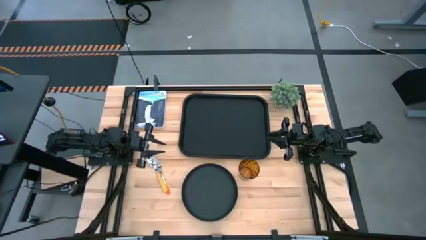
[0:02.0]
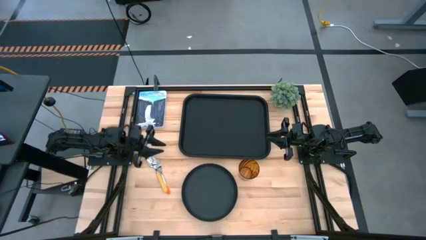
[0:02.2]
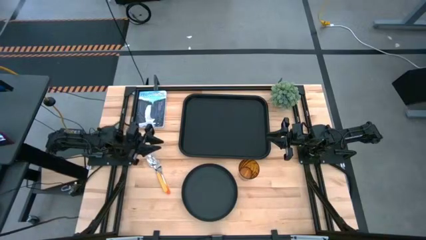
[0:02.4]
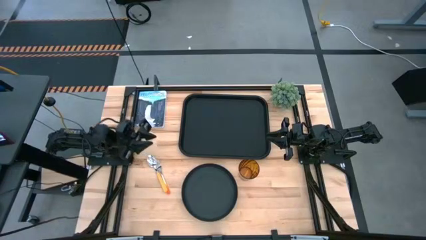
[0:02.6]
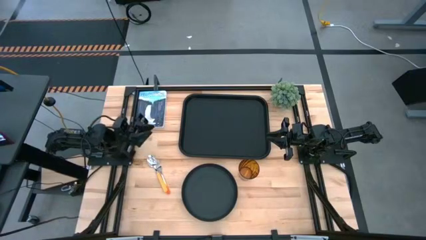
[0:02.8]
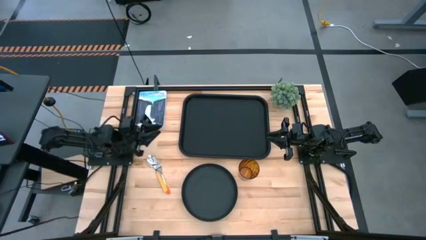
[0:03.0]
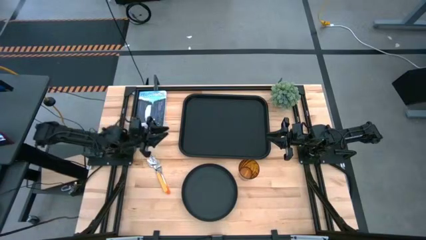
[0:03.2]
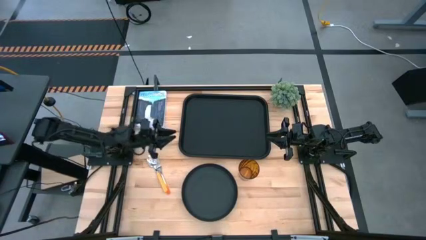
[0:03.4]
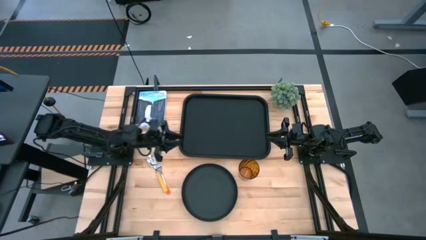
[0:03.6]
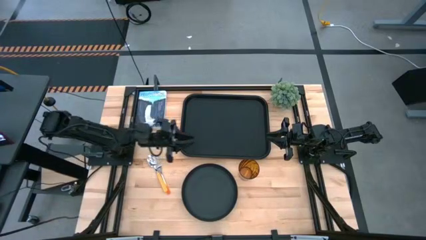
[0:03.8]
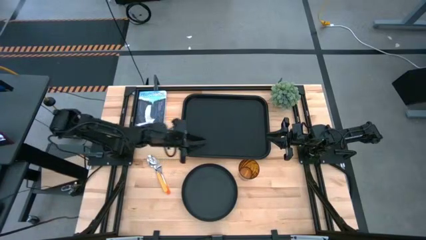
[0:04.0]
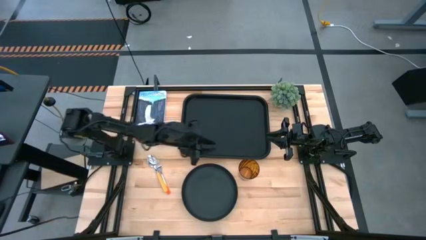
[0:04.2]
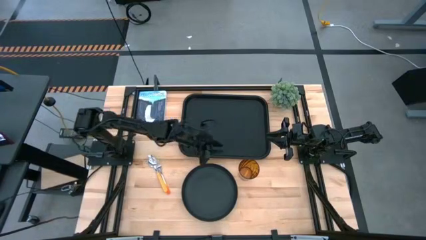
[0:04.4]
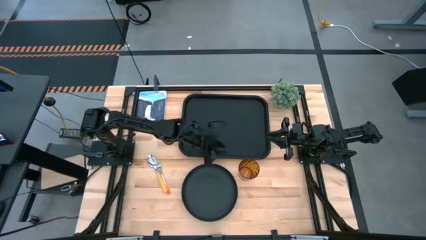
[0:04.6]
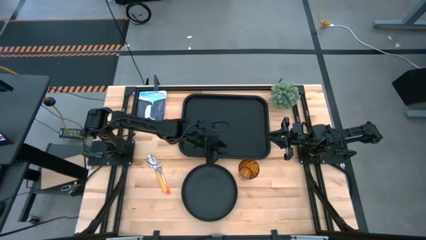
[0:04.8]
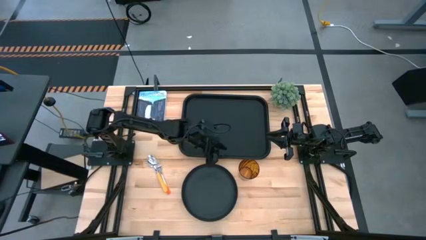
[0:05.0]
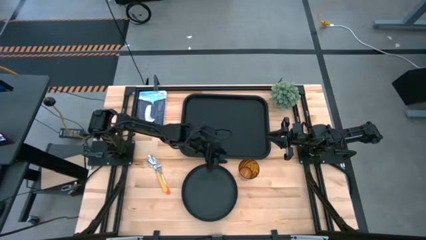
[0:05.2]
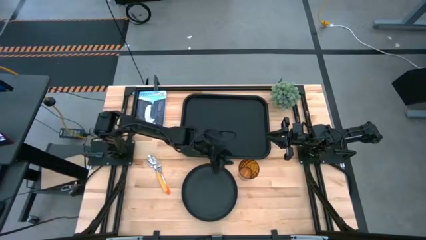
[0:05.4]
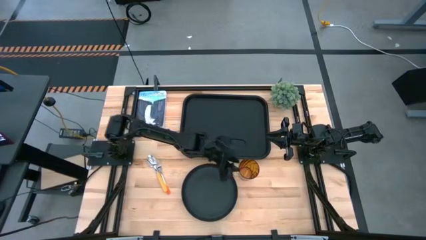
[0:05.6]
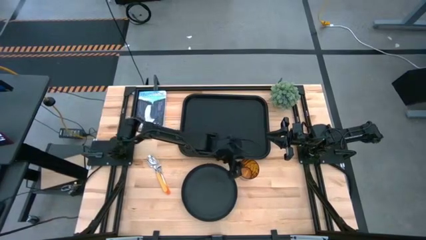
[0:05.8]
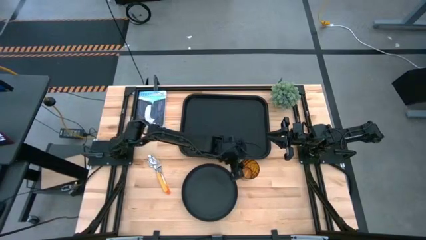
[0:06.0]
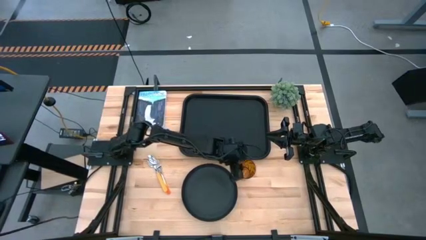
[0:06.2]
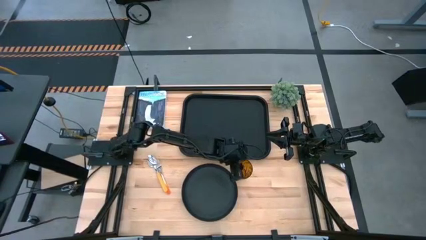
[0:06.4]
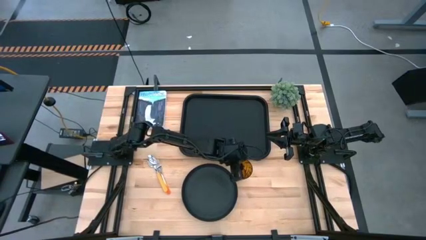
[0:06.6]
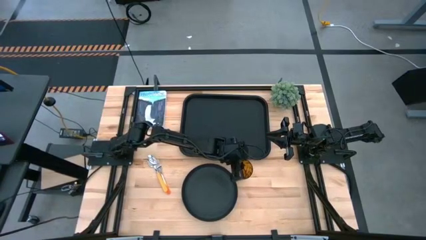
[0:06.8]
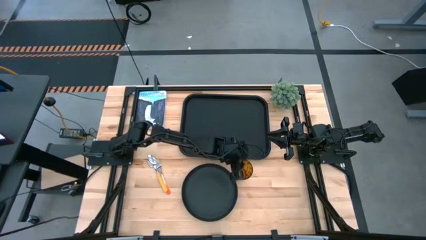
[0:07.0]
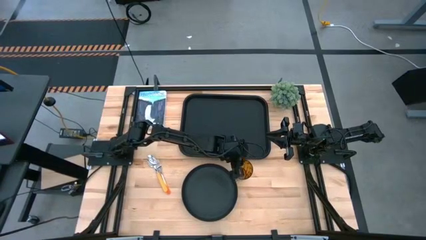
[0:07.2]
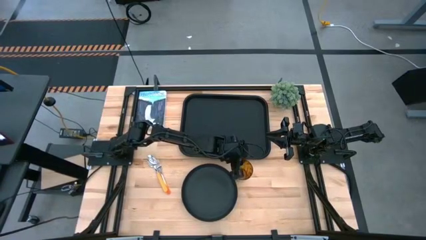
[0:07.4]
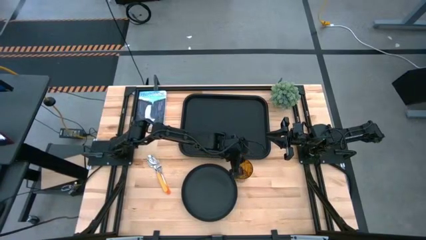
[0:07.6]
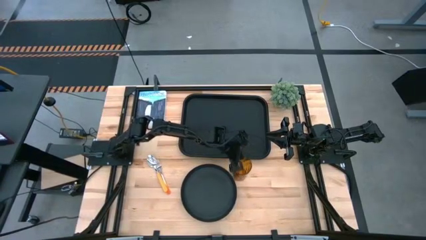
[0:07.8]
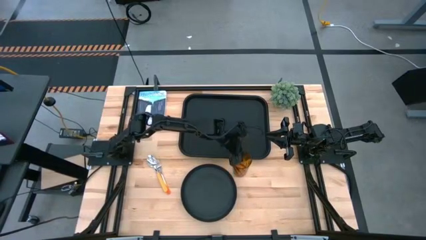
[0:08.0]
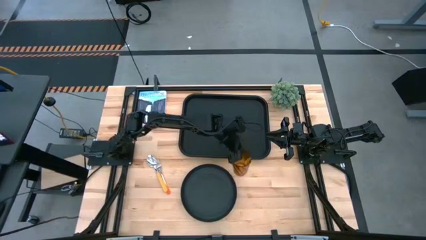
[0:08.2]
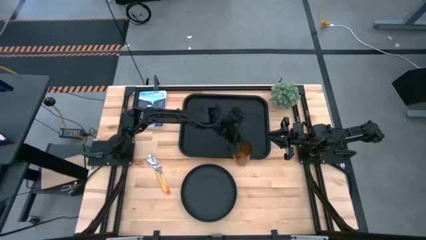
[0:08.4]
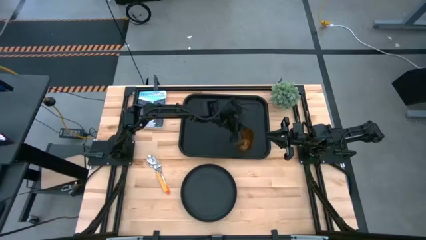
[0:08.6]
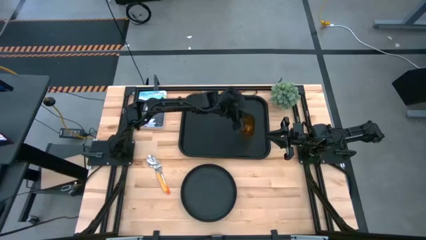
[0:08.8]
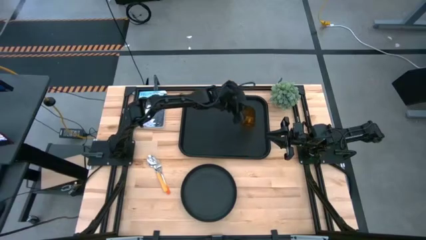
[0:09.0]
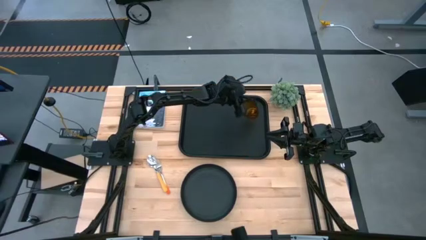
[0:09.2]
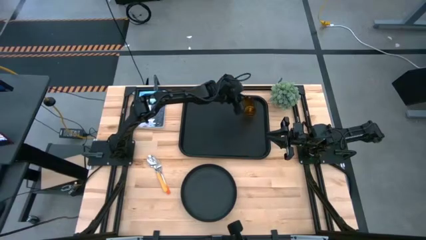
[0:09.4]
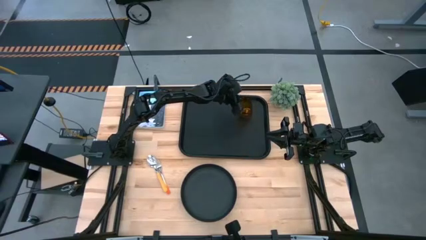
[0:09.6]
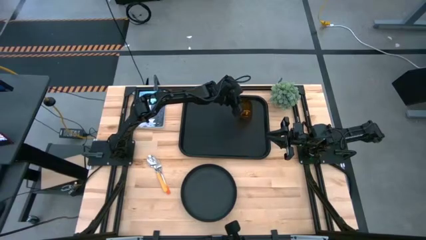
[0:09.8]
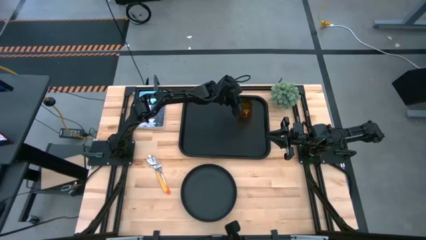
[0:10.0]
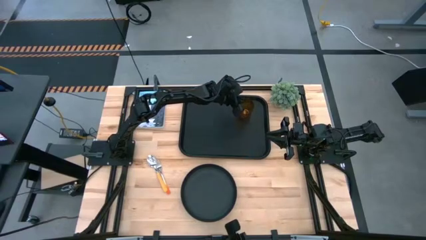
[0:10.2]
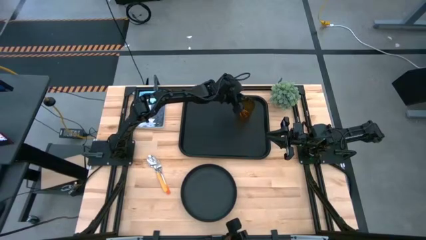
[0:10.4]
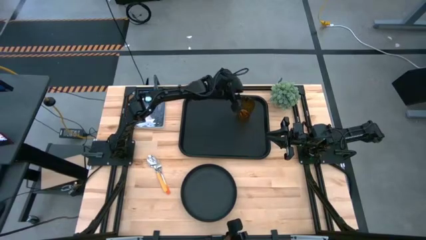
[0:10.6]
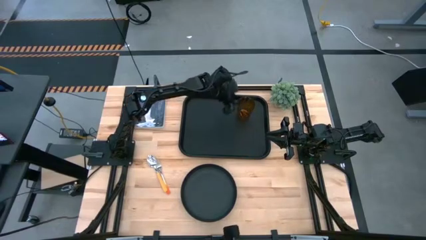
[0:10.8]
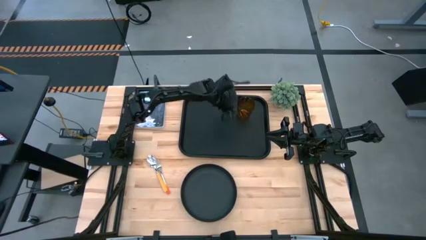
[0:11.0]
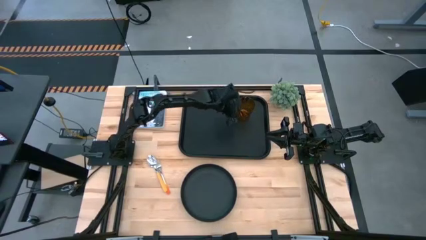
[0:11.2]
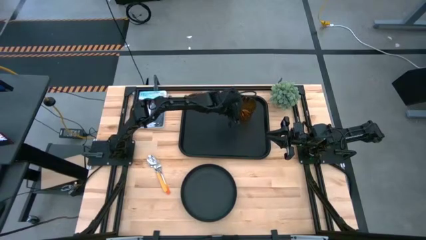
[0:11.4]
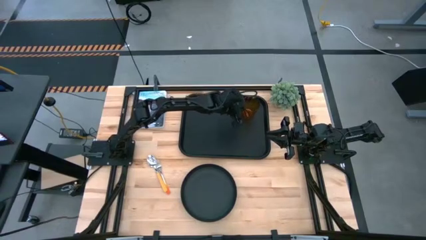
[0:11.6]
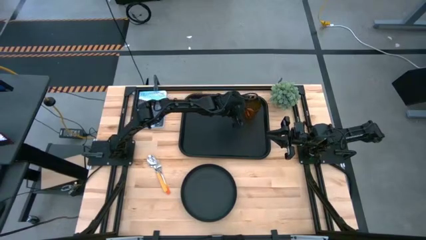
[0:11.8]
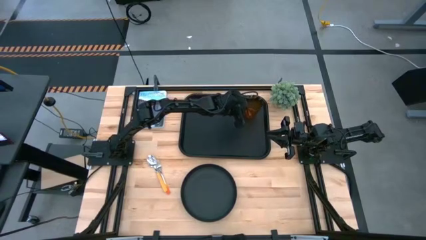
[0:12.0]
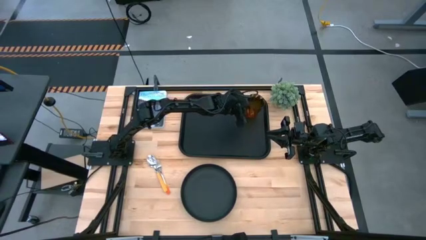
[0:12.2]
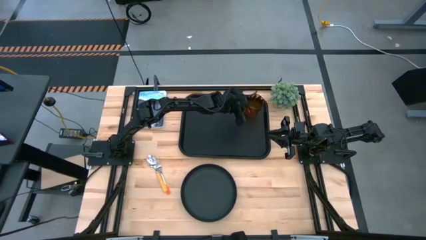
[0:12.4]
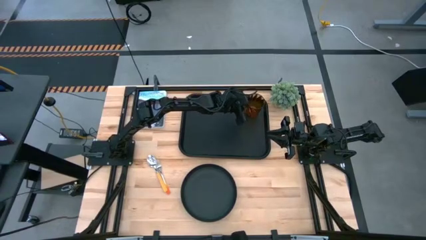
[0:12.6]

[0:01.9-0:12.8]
Task: Pick and place plate/cup/fork/spoon on tray
Put the brown glass on the top right of the black serving tray

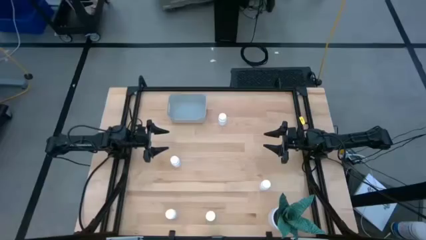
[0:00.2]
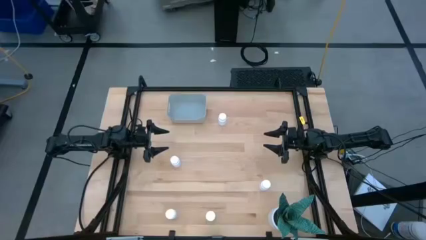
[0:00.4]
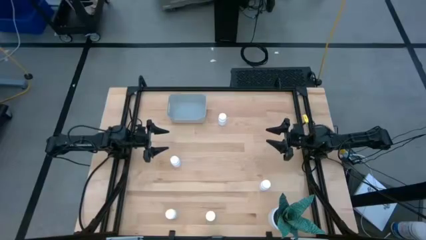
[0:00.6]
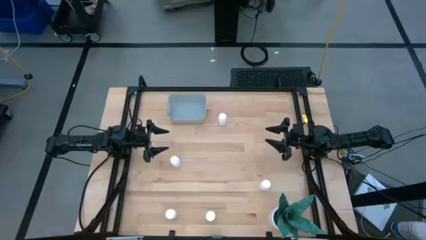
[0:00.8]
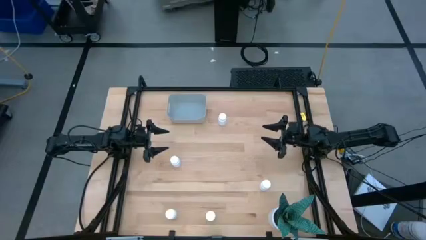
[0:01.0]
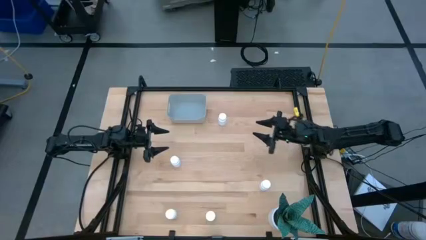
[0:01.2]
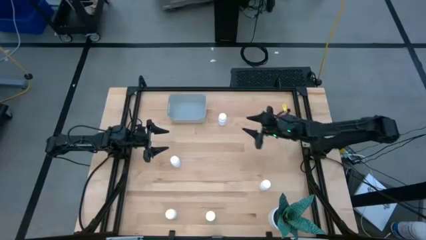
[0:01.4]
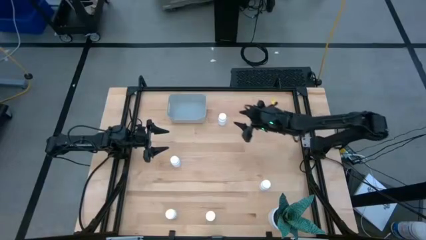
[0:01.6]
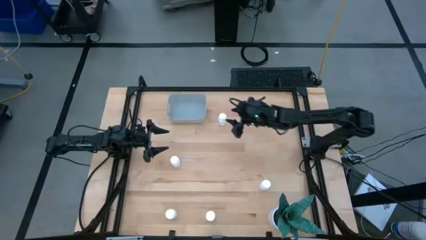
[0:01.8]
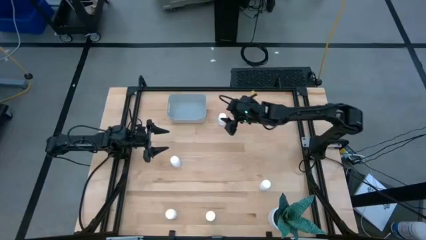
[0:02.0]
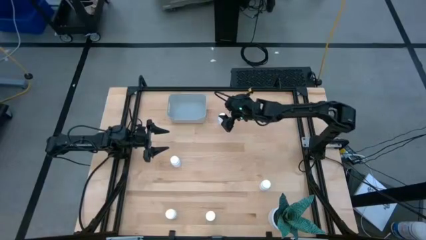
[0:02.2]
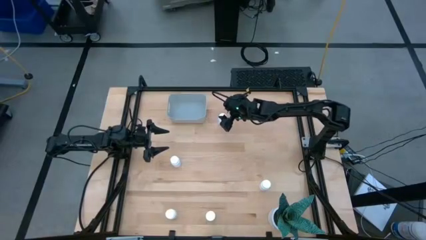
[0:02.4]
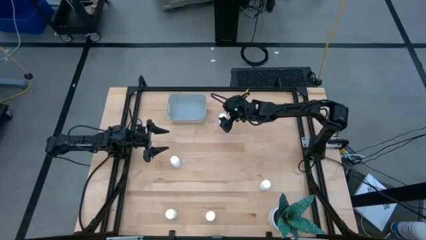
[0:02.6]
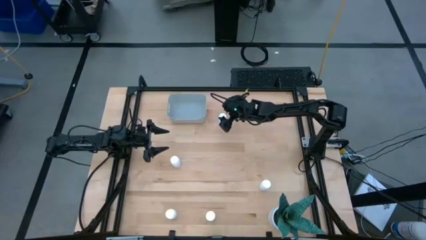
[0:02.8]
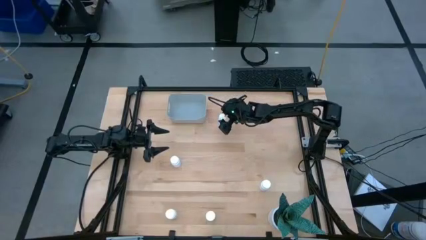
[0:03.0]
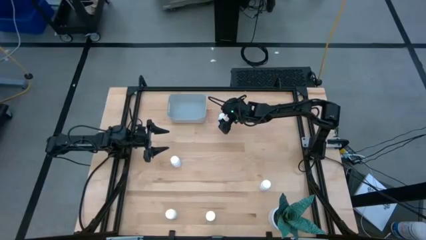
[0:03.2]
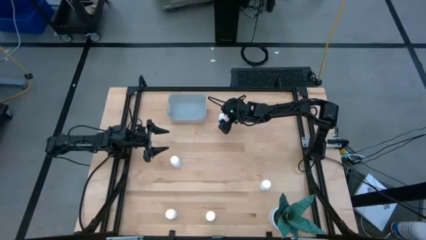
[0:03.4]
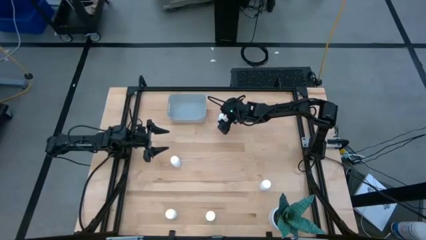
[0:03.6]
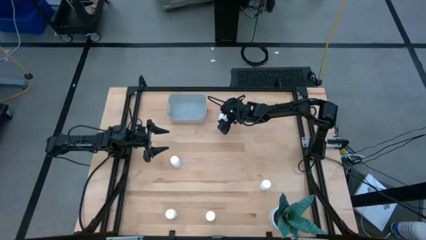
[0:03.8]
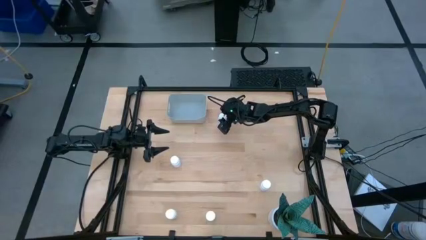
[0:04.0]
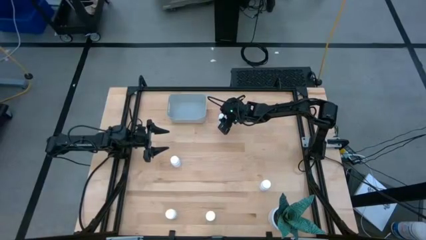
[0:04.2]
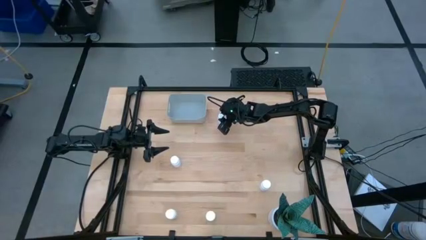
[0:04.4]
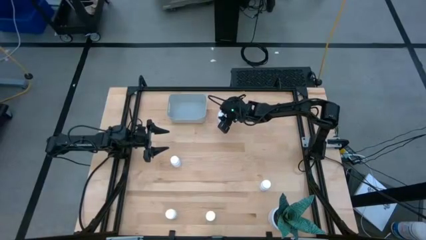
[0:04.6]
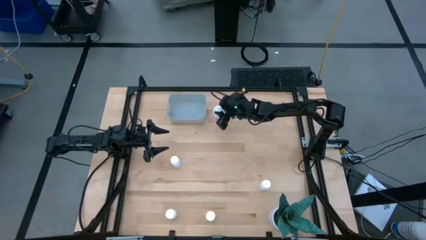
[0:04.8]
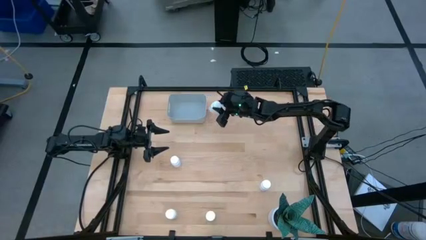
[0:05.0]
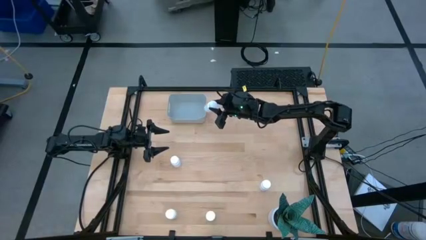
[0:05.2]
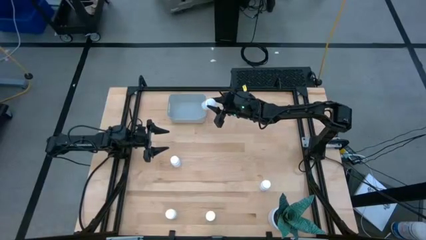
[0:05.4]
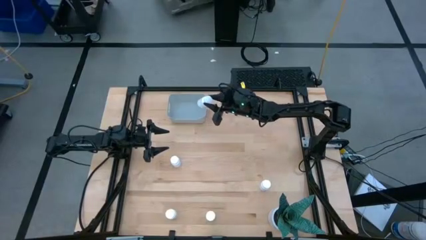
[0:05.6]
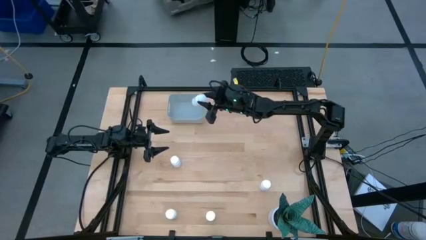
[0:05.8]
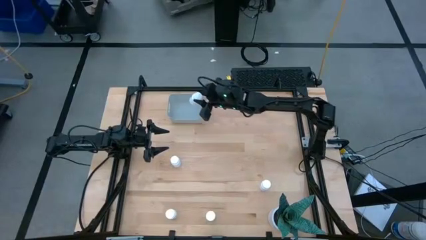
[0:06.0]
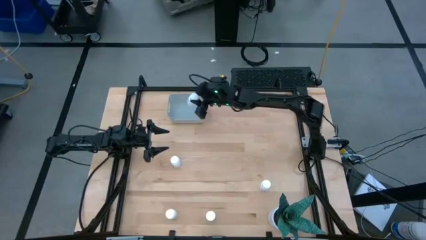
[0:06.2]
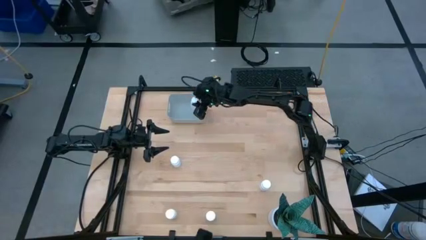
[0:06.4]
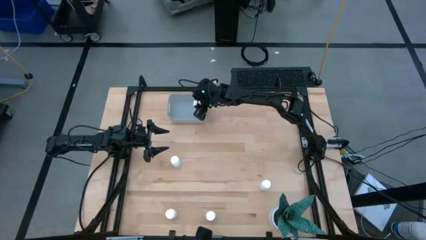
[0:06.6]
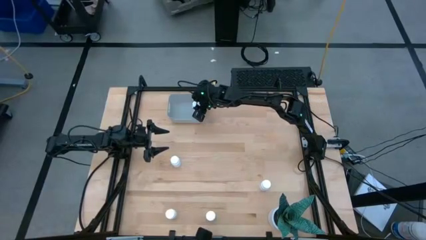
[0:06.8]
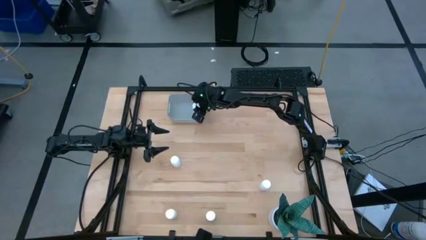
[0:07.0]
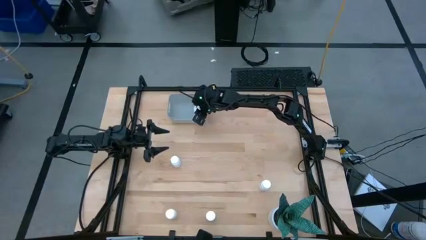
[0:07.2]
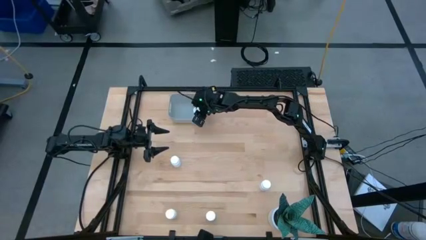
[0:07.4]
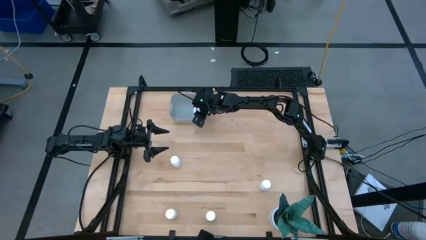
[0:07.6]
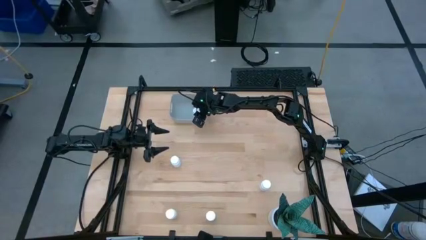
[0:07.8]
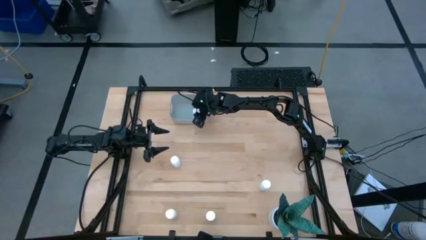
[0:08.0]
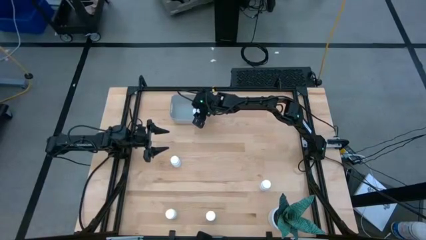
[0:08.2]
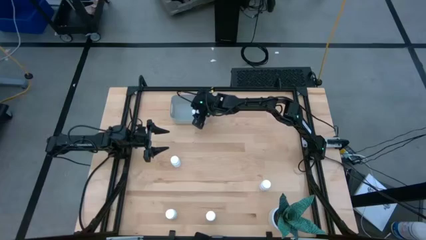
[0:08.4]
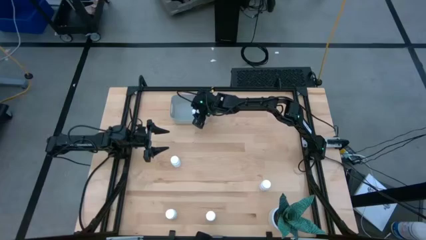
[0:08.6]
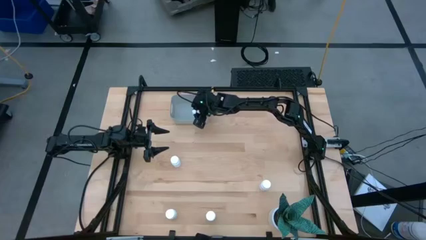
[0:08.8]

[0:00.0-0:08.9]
Task: Pick and place pill bottles into a basket
Put the white medicine bottle into the gray bin
